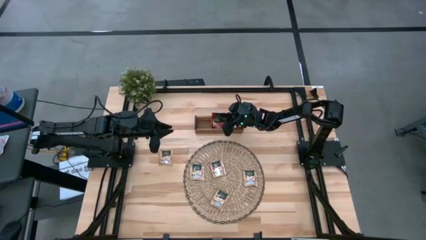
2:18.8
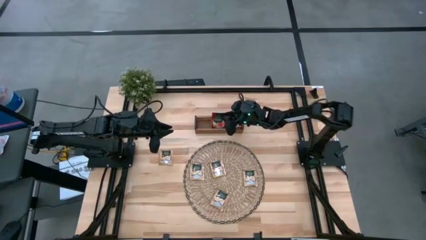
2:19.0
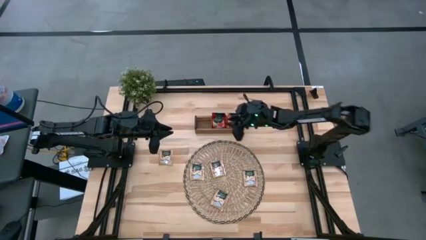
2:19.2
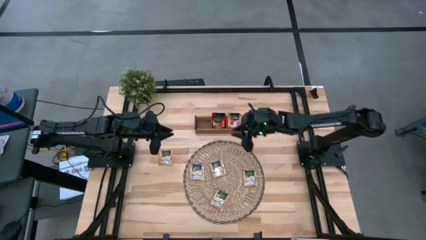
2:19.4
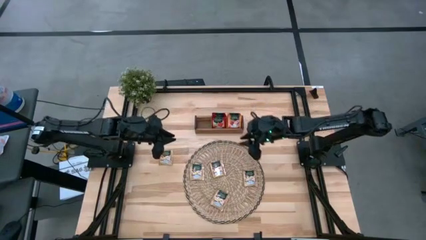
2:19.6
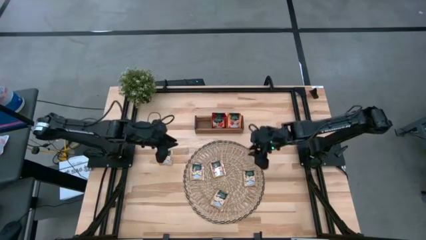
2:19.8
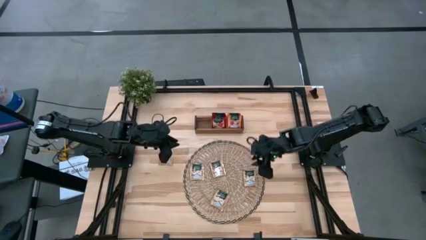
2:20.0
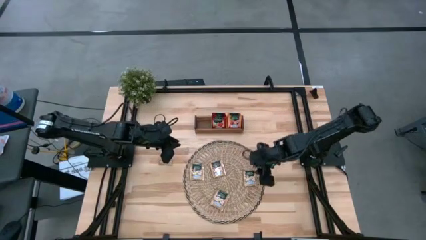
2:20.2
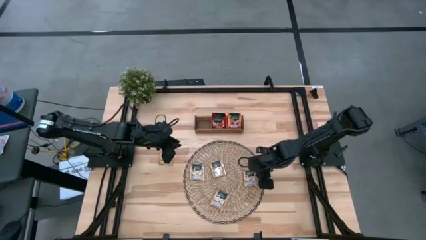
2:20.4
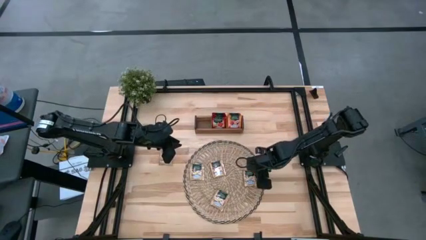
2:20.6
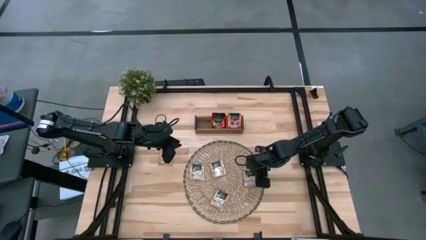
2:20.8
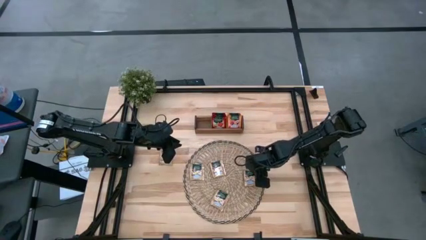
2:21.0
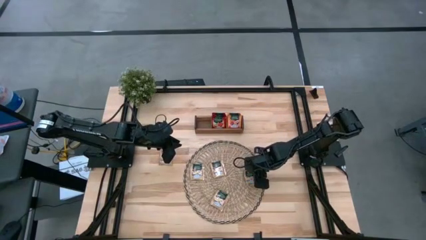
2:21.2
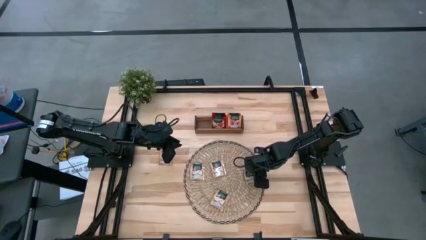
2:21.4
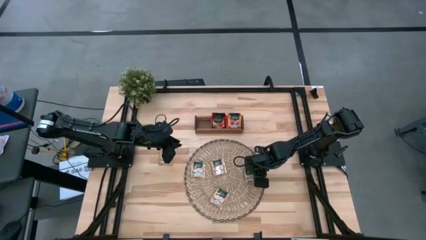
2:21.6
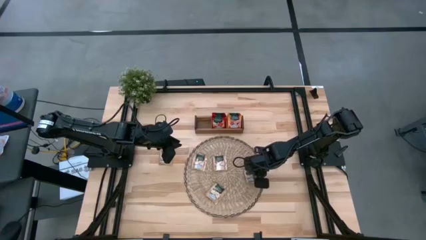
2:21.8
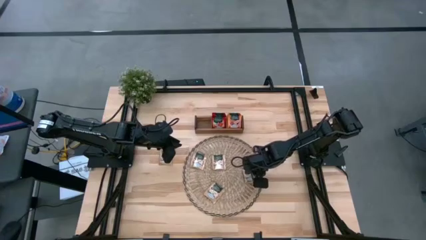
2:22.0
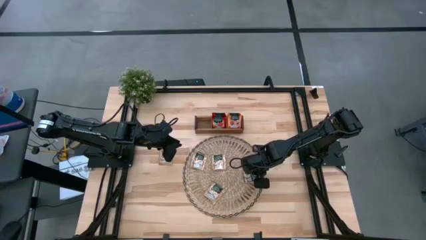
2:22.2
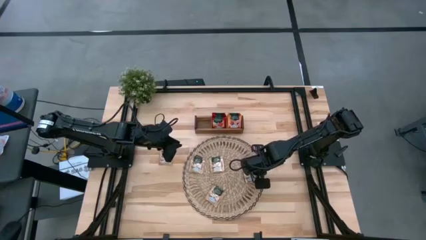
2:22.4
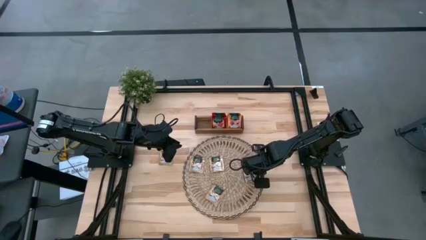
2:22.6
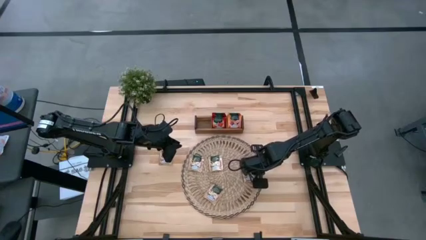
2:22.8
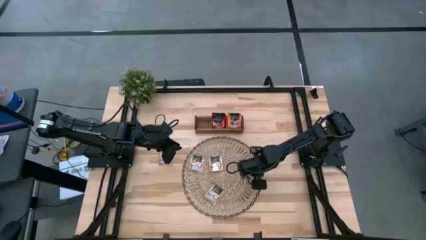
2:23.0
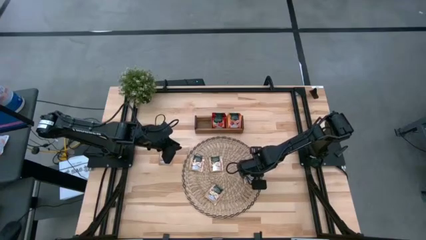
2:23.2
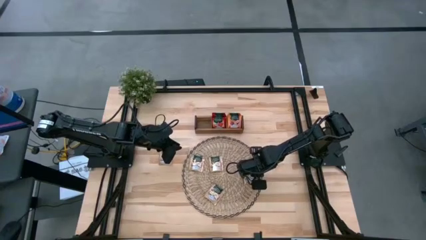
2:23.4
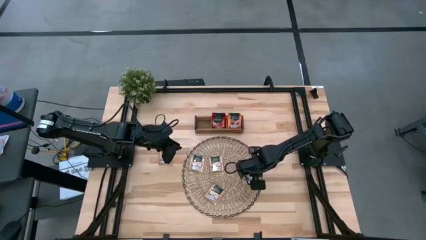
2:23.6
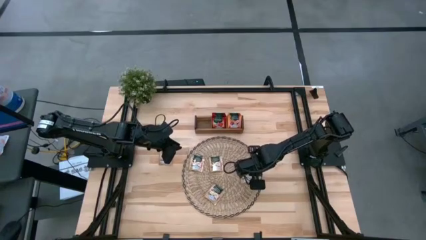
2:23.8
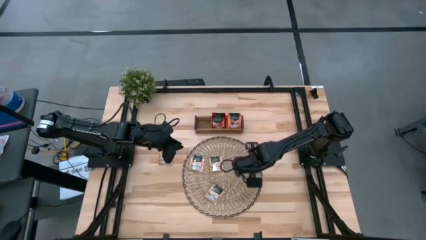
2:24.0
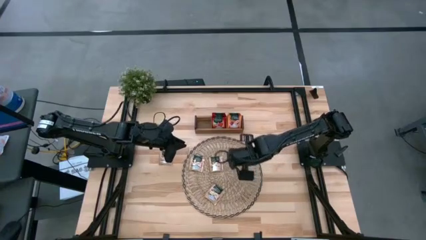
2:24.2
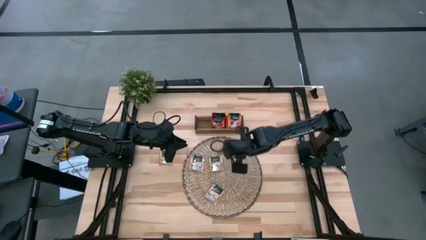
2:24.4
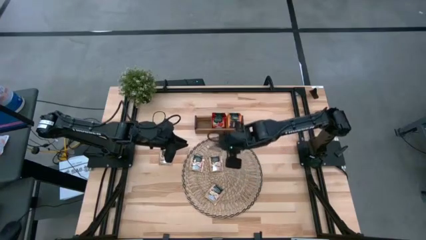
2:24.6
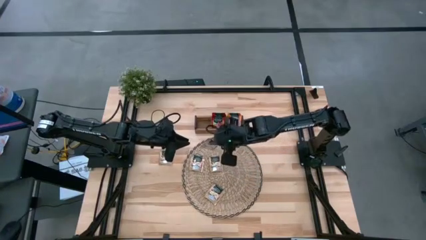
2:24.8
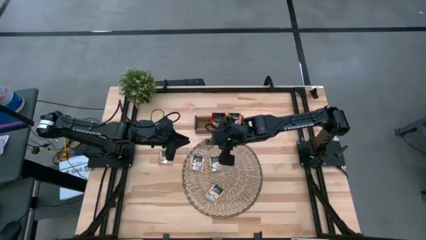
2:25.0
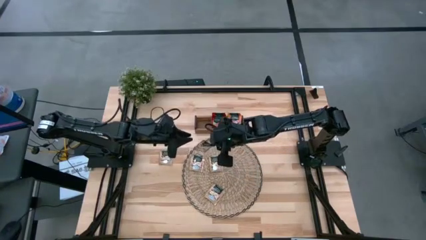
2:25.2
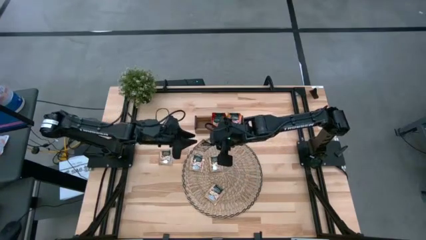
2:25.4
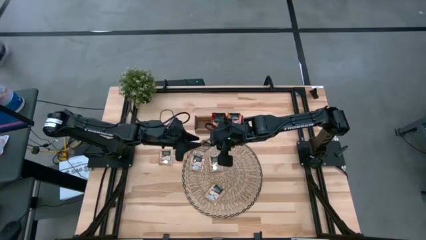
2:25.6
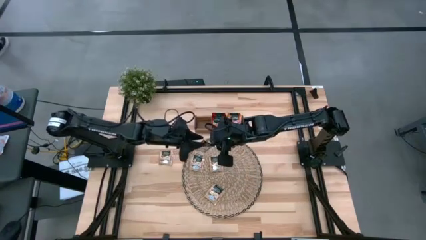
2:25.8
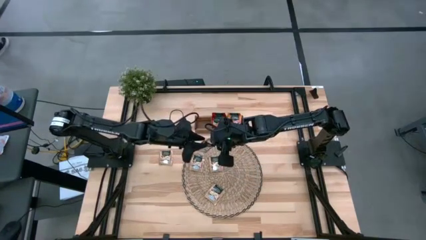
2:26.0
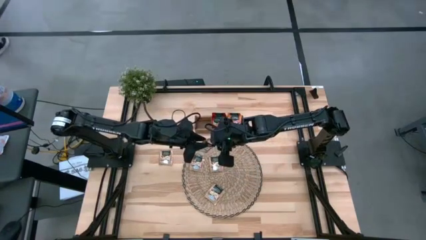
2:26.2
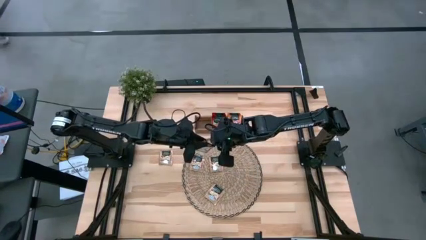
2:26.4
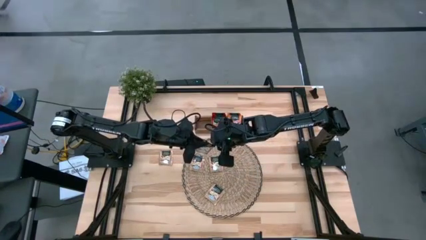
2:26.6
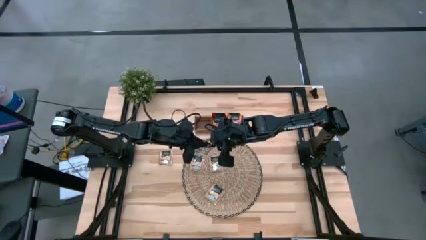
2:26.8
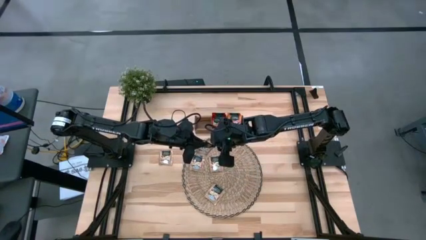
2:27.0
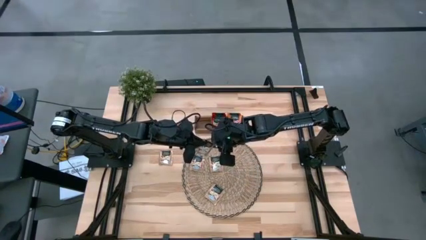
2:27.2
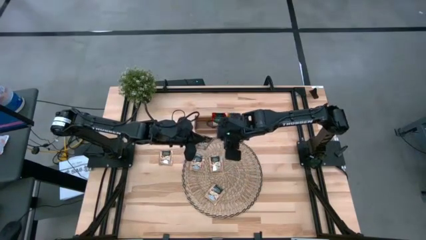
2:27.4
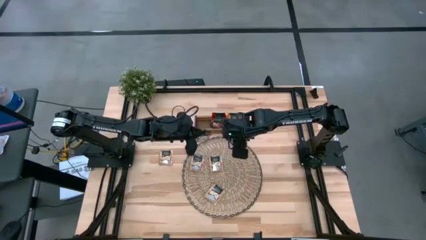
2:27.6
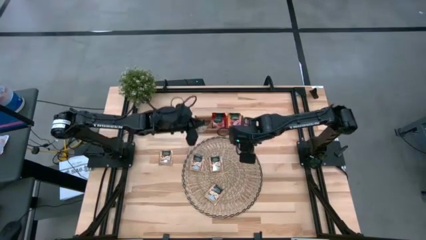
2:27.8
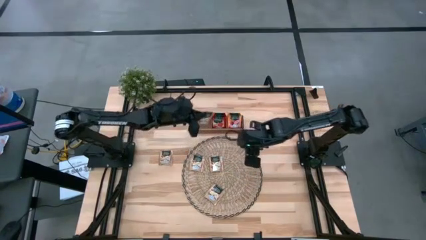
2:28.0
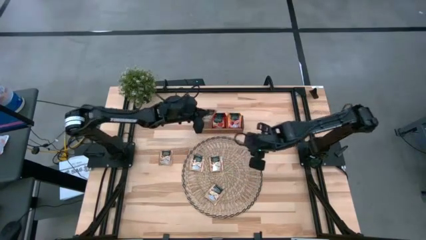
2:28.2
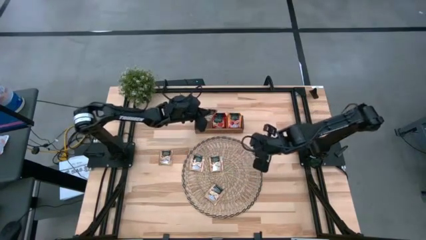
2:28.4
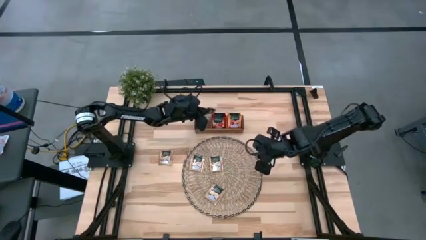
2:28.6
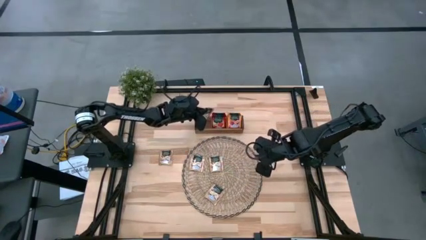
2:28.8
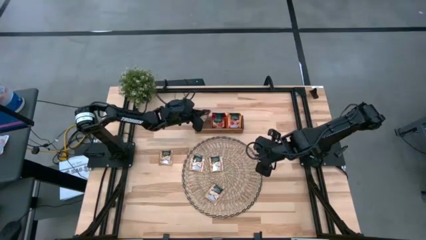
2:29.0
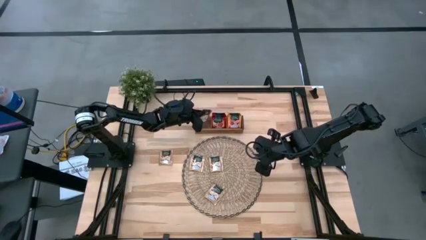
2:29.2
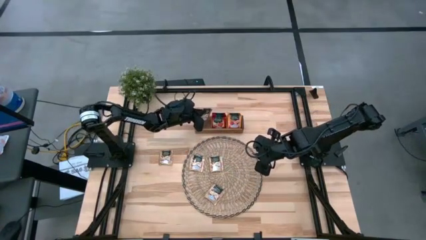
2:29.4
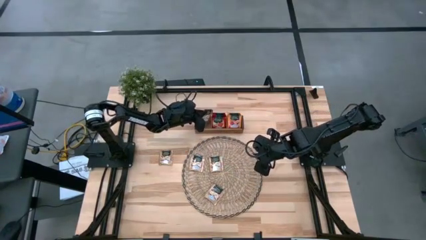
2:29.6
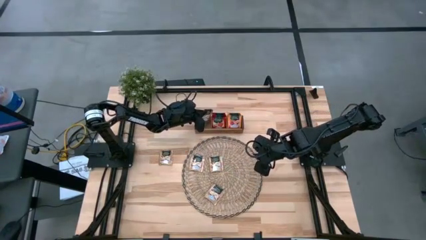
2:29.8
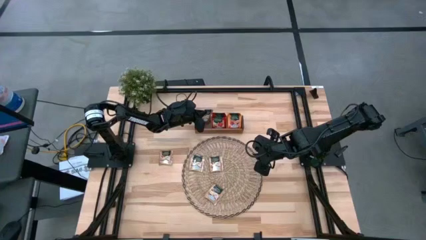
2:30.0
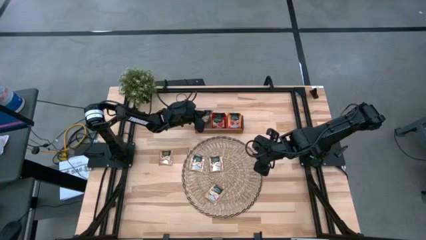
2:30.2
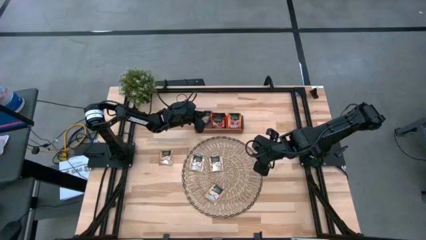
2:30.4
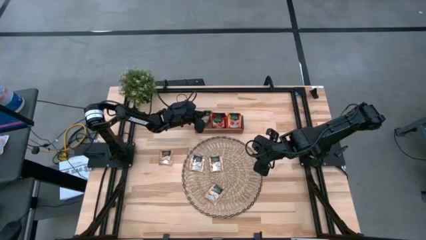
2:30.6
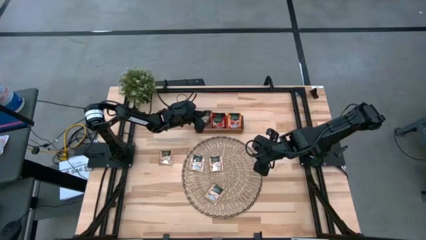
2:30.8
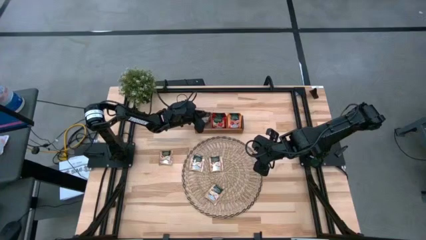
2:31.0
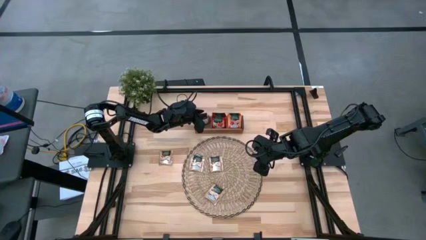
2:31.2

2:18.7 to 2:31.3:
Task: Pick & Place Tea
Put the green tea bag to the left of the wooden organizer

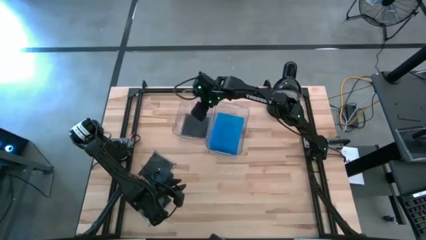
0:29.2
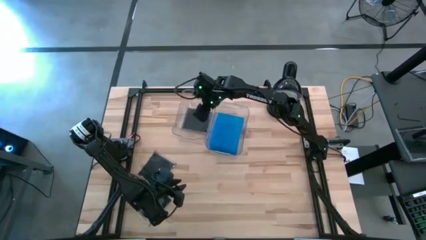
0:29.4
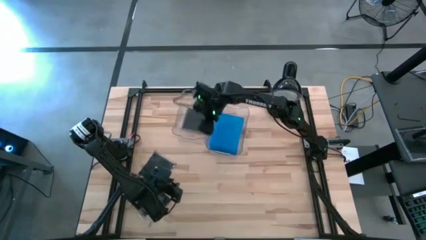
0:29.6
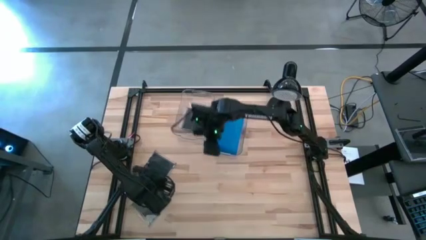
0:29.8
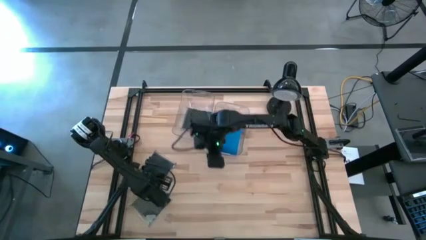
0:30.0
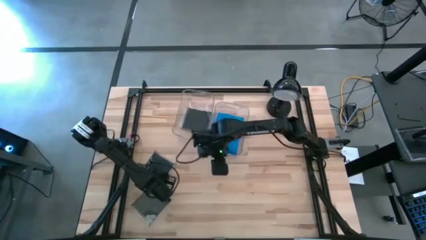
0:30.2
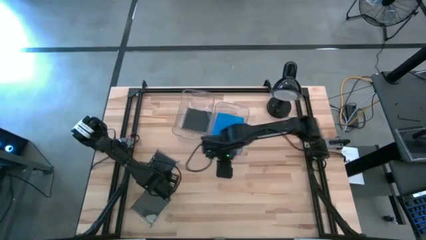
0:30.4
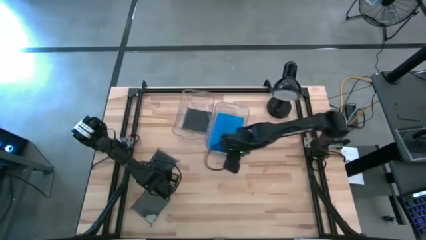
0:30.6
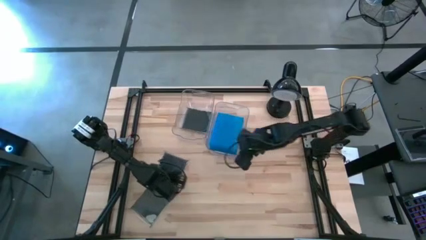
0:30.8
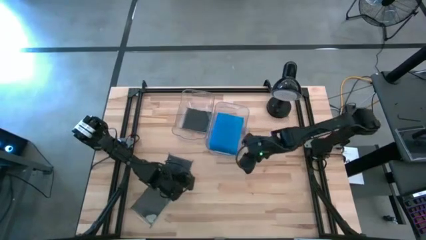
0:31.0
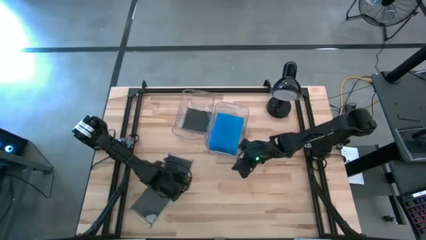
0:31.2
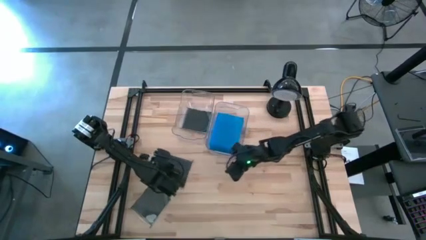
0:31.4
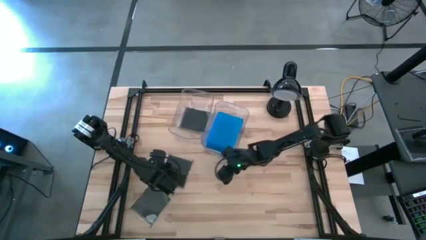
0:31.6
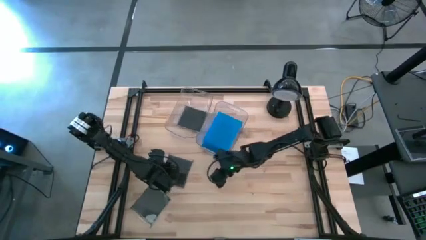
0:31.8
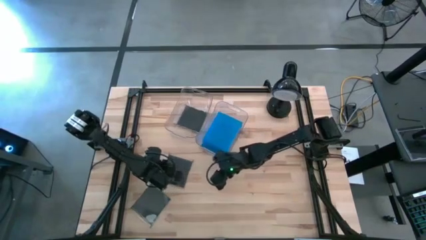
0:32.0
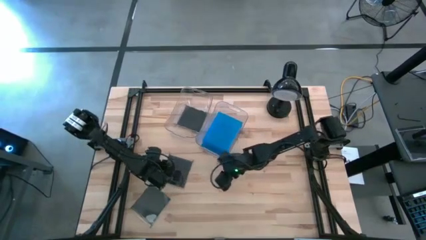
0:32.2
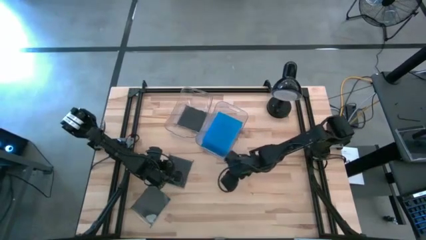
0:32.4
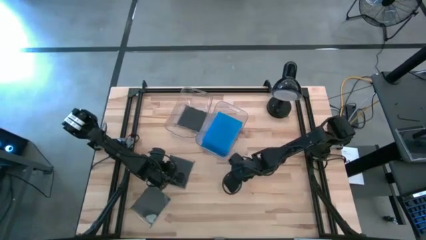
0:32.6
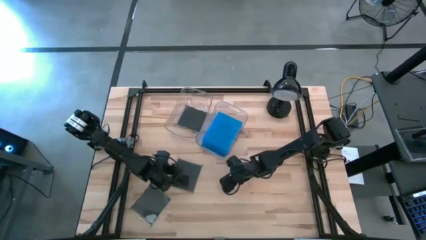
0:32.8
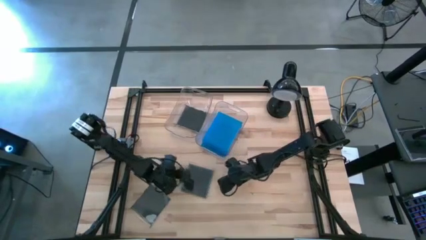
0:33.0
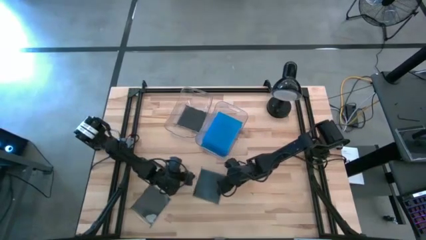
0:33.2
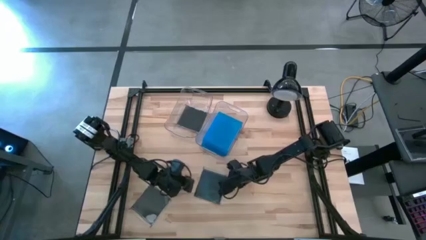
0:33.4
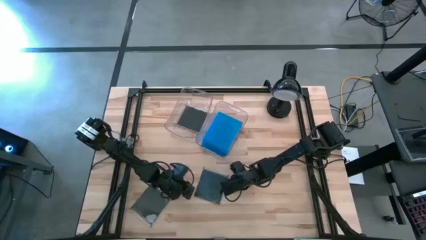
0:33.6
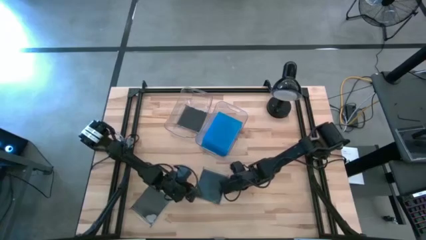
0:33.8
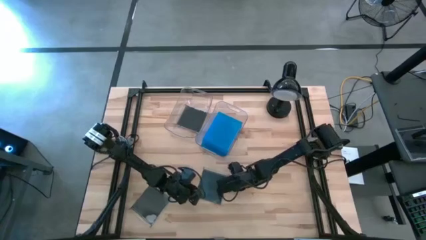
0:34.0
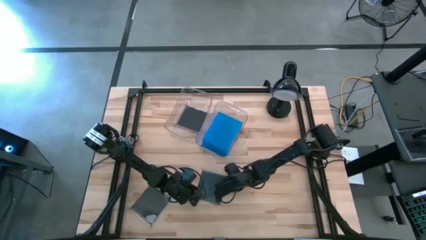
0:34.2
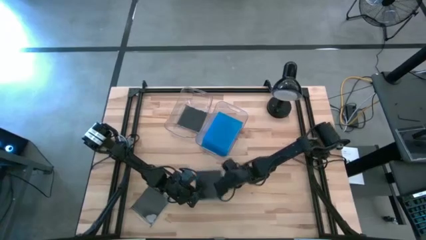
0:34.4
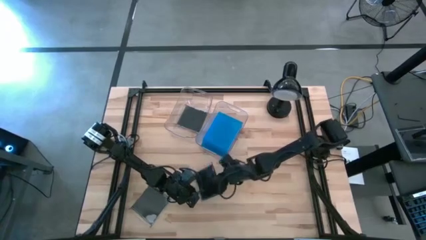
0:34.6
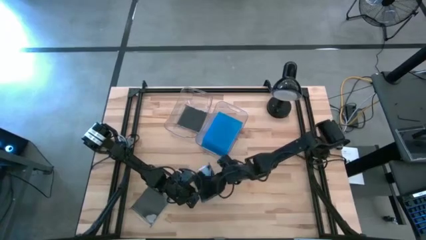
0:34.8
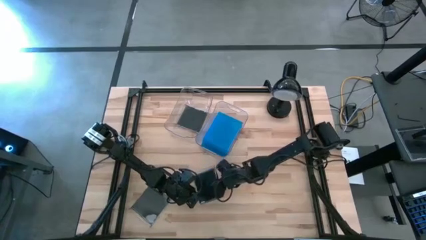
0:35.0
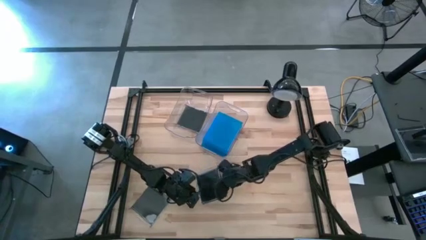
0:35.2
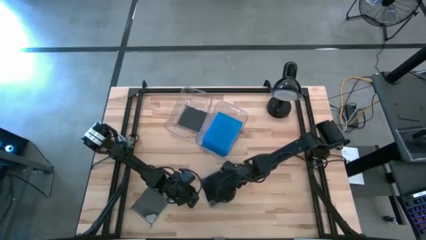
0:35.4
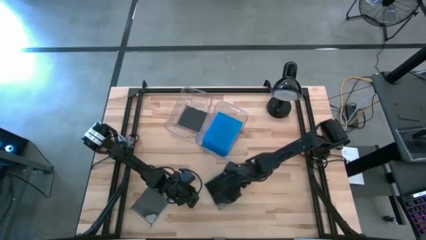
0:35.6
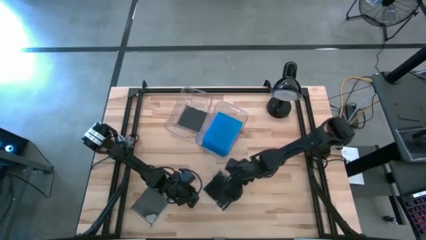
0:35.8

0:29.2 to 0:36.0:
Task: Pick & place jewel cases by type
Put the top black CD case into the left transparent bin
